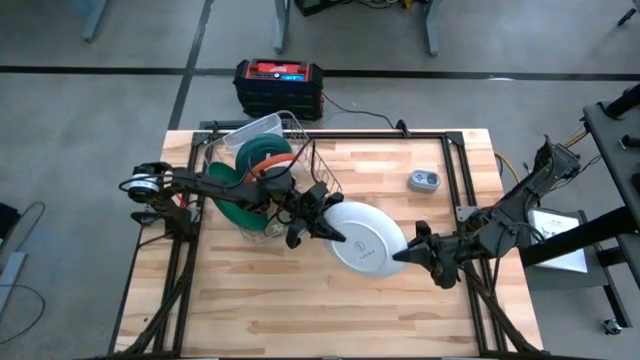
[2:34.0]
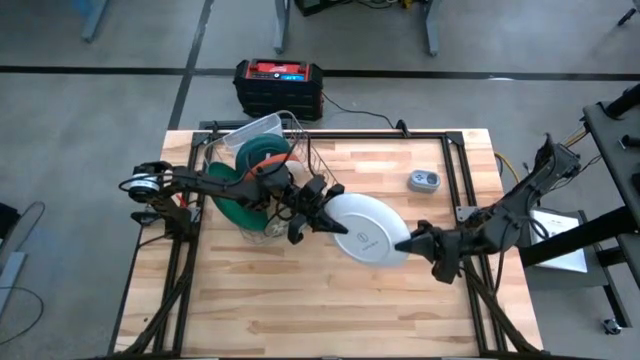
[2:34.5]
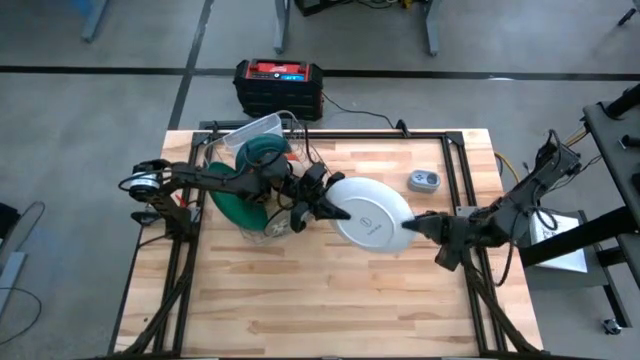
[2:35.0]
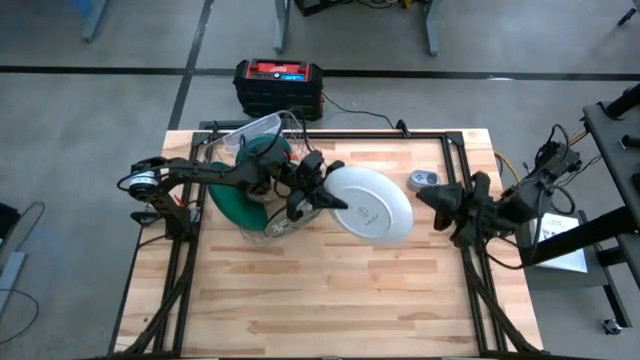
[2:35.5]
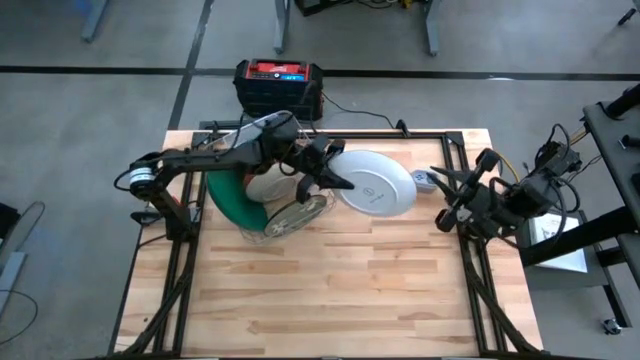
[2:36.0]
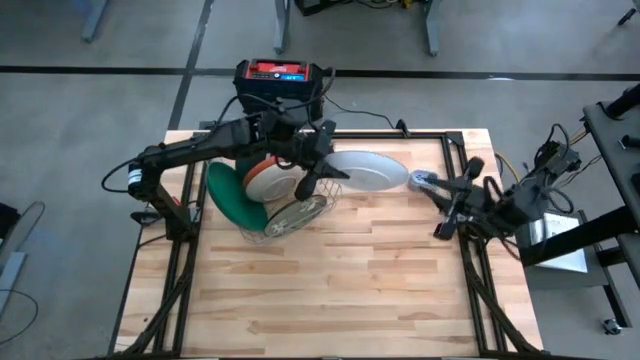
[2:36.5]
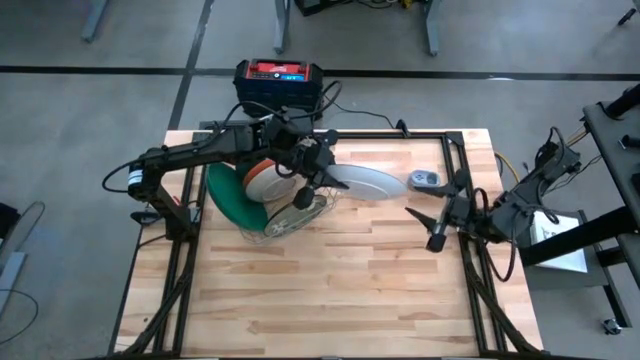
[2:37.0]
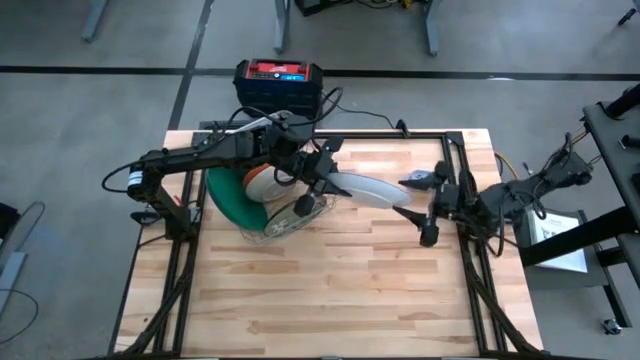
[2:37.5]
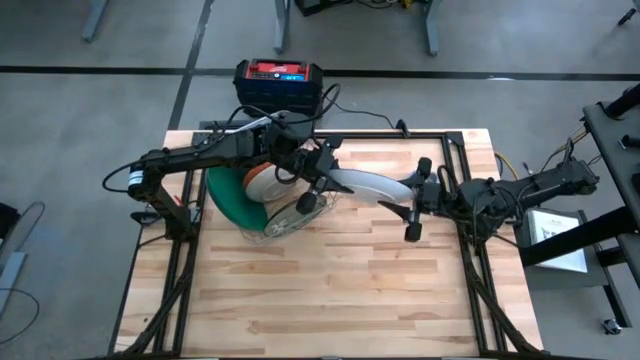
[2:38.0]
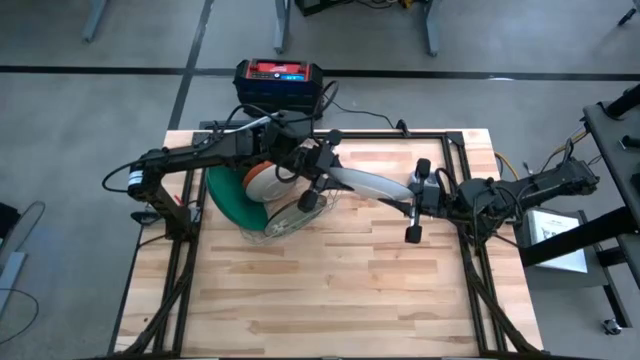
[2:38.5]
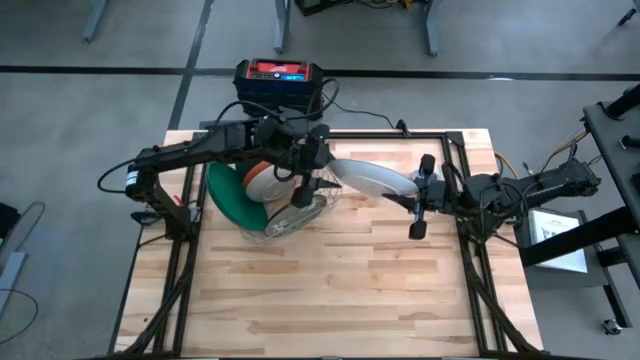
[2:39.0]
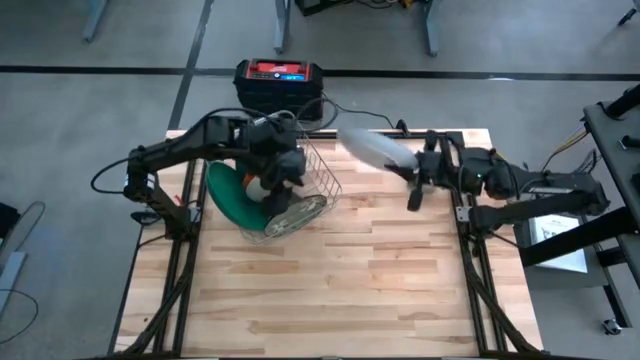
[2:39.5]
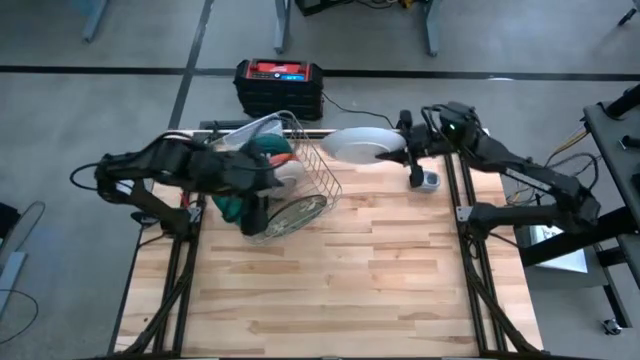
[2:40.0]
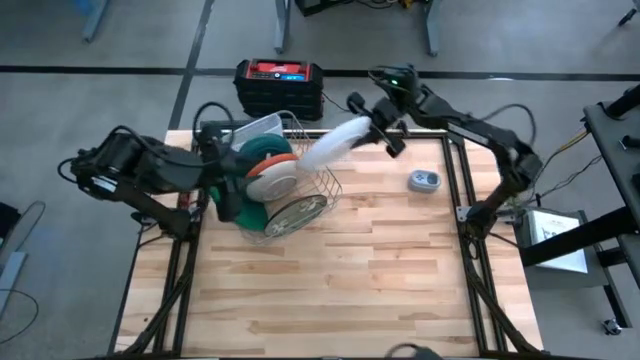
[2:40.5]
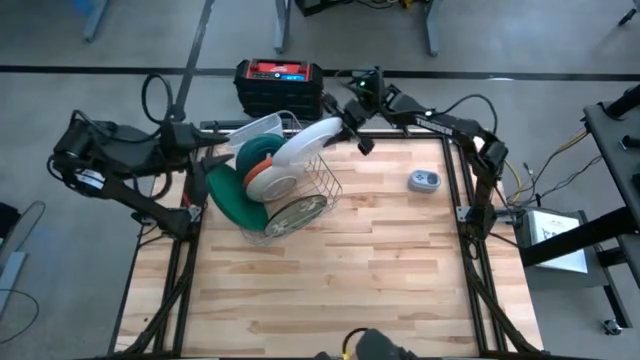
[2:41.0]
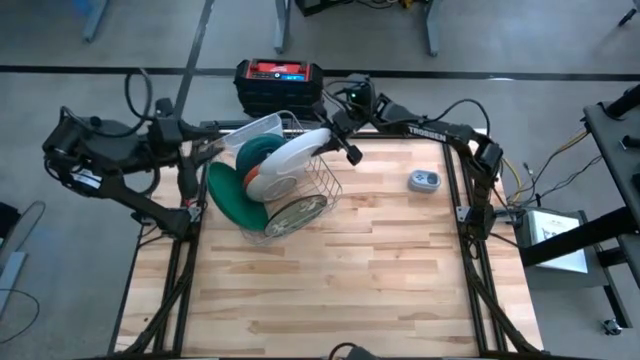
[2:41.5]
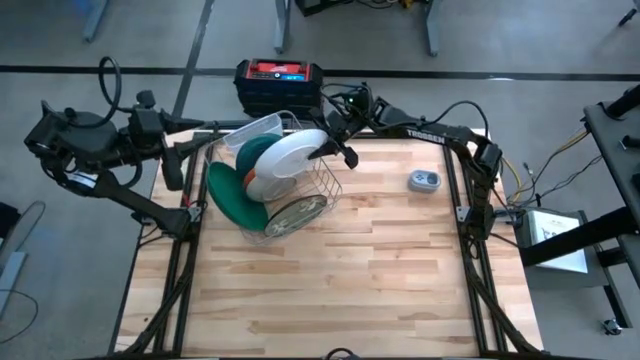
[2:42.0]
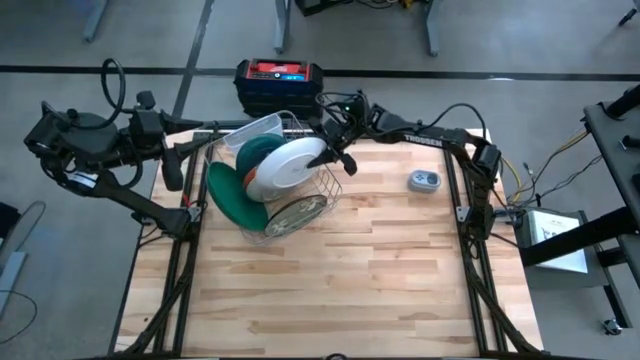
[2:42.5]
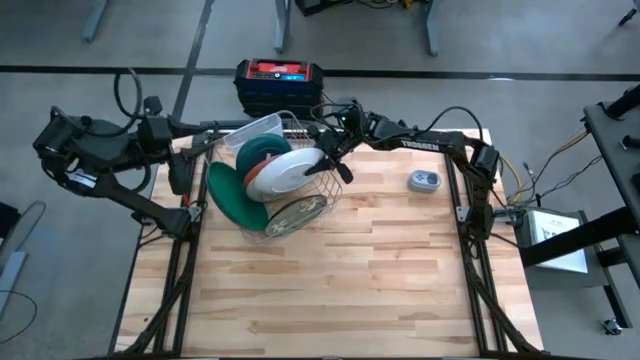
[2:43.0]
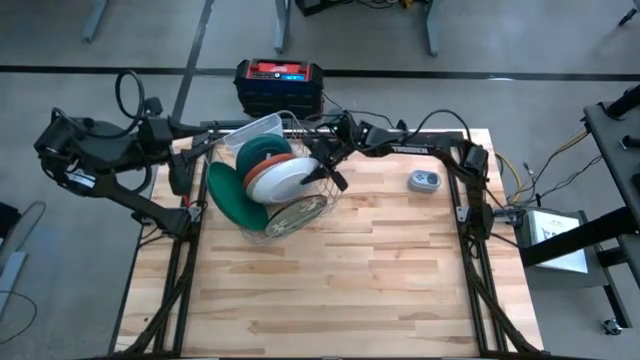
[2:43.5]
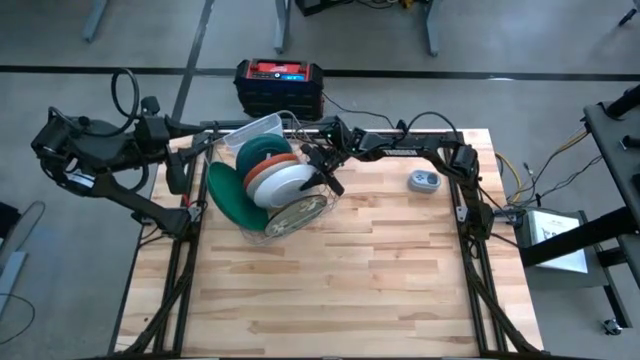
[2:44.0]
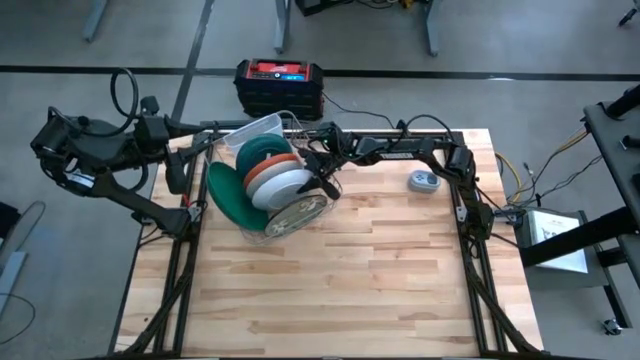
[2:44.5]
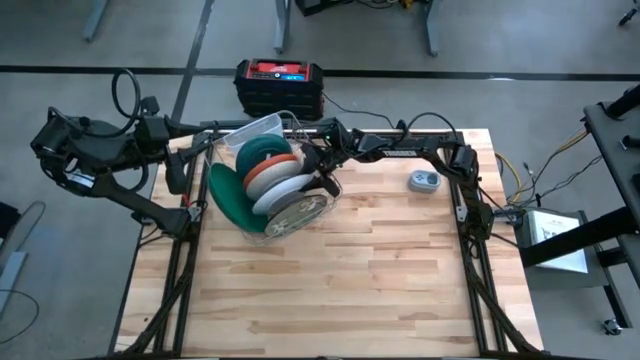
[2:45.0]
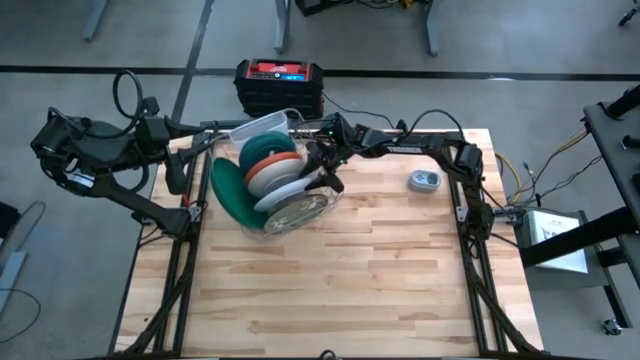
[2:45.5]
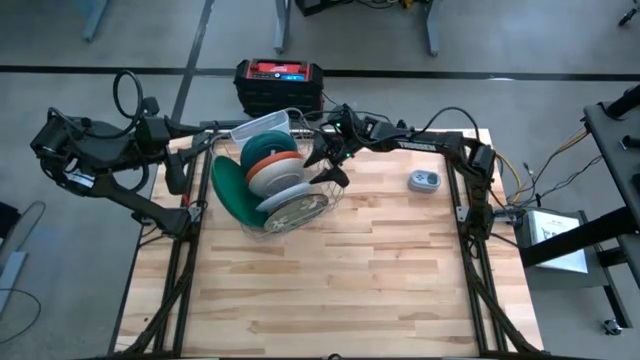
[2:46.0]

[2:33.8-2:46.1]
Task: Sort dishes
Adjust the blue ceramic plate into the dish rack

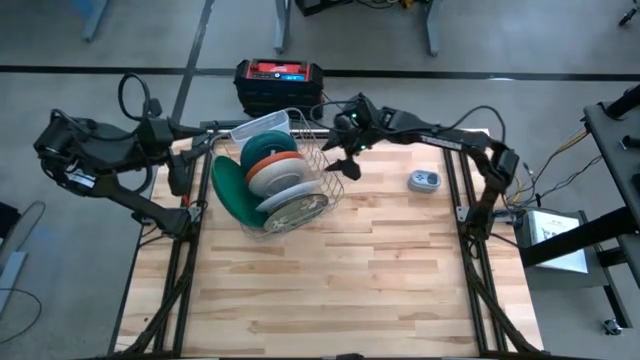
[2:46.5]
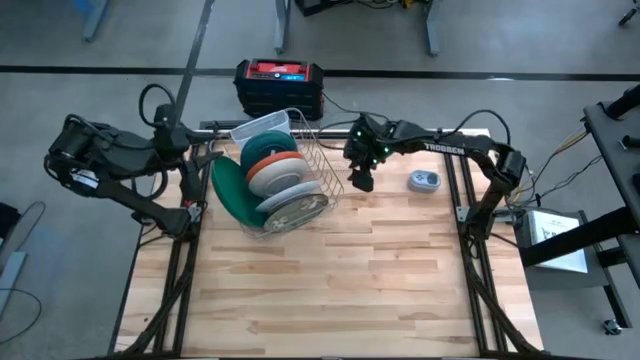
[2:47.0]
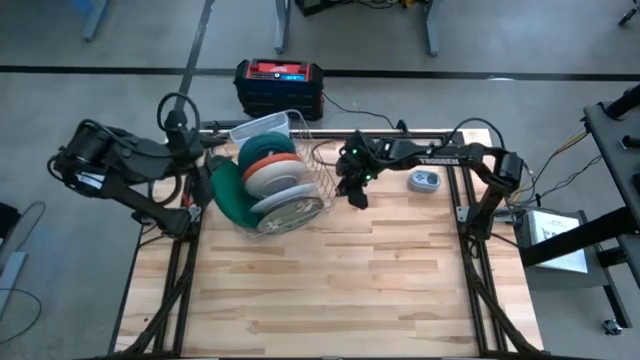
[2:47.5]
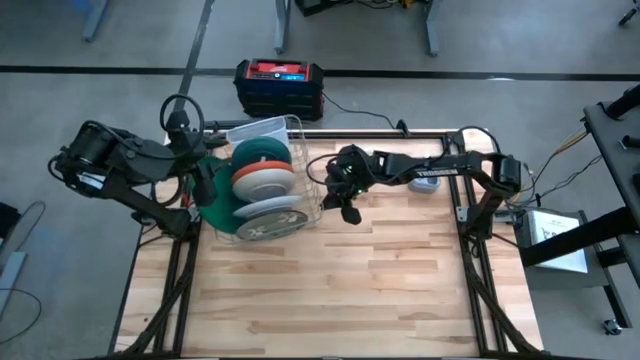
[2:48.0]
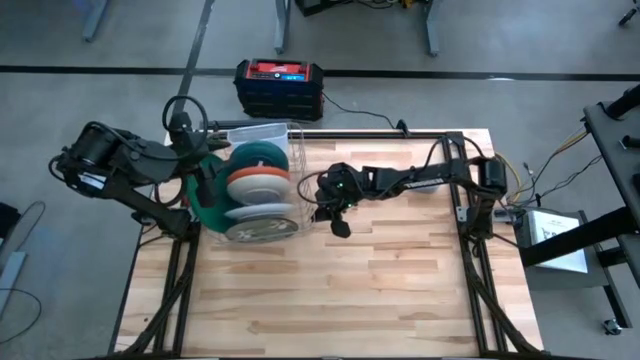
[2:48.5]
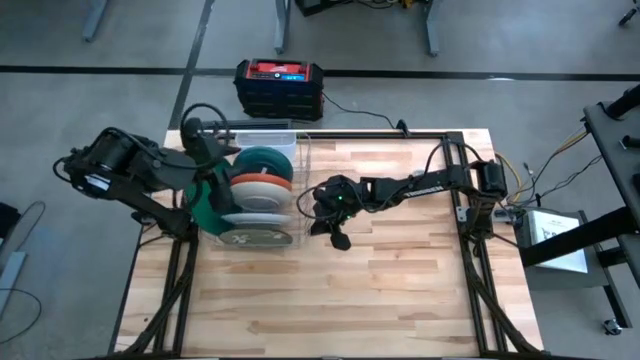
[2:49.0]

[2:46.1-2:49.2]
Adjust the dish rack

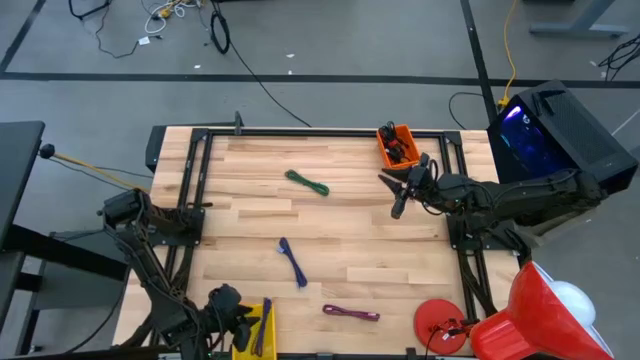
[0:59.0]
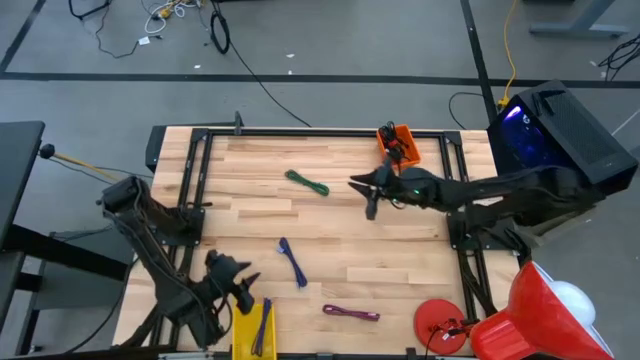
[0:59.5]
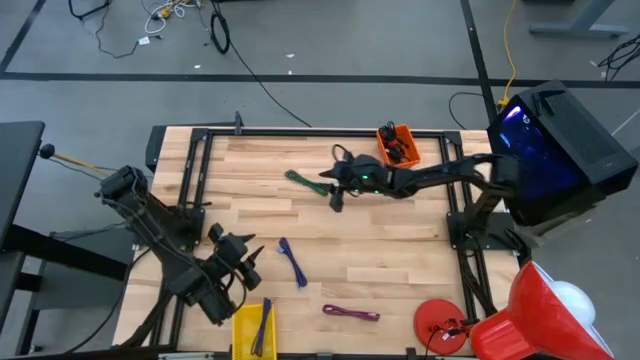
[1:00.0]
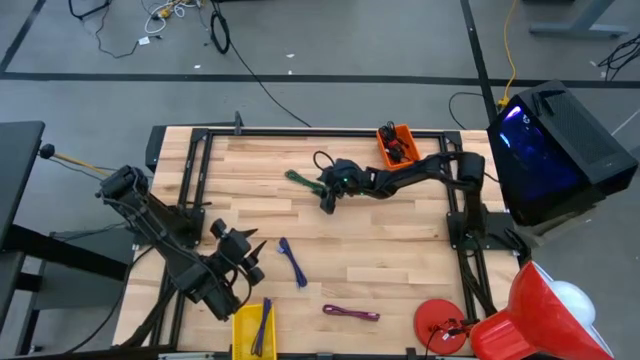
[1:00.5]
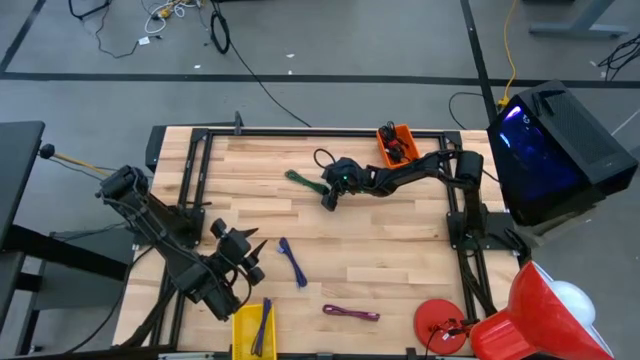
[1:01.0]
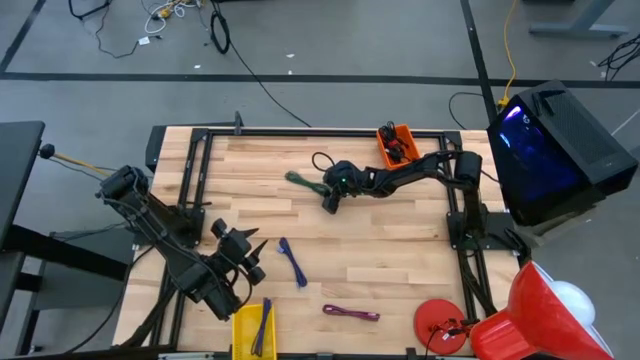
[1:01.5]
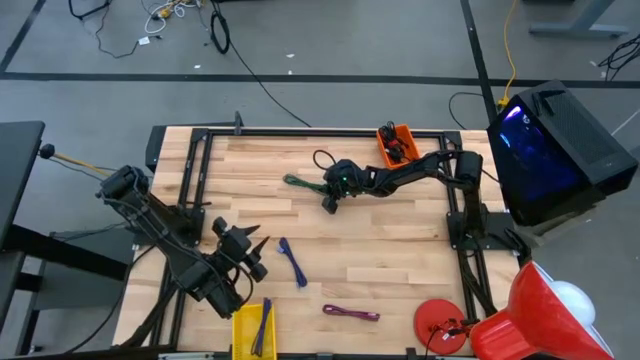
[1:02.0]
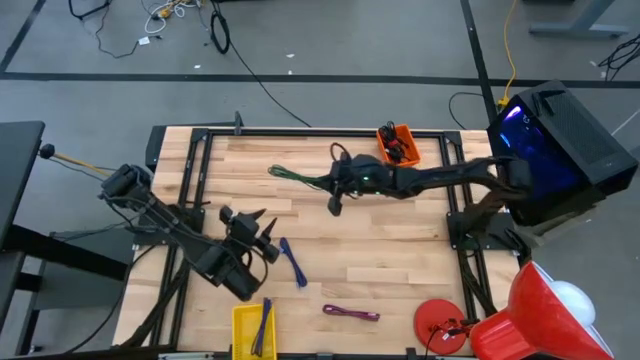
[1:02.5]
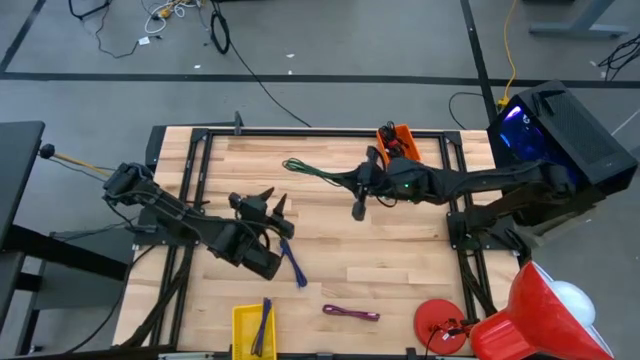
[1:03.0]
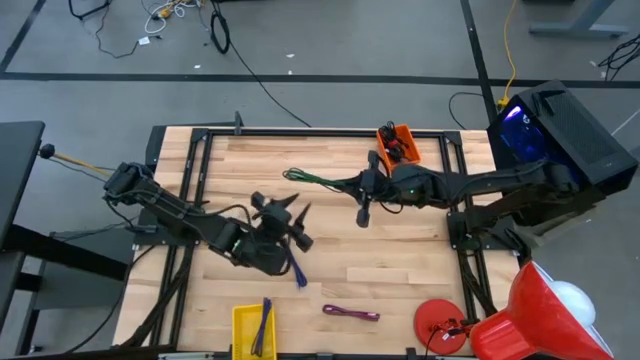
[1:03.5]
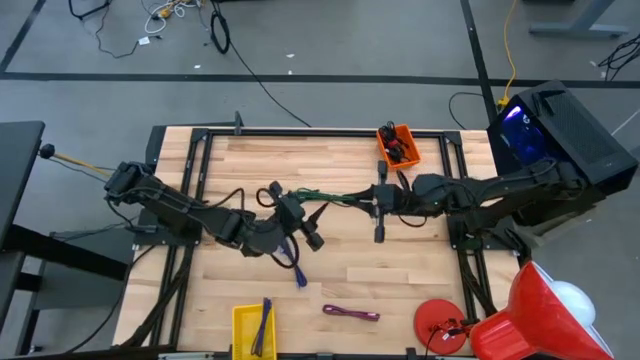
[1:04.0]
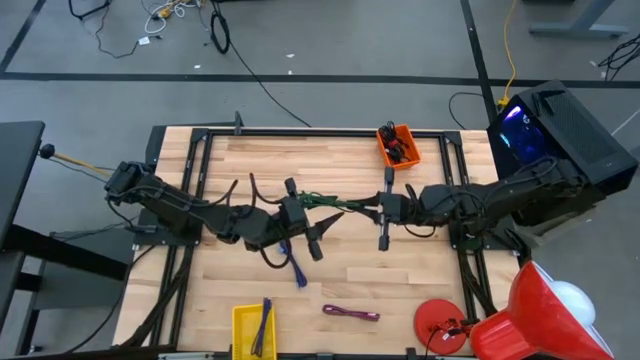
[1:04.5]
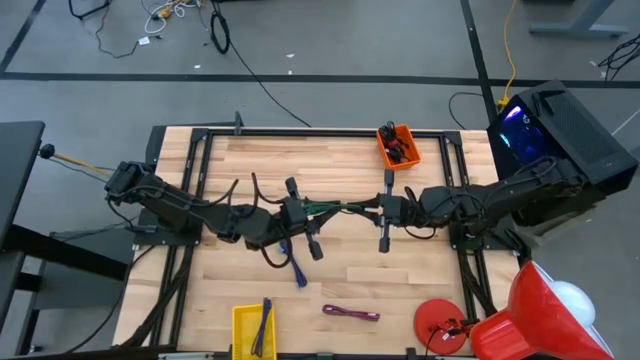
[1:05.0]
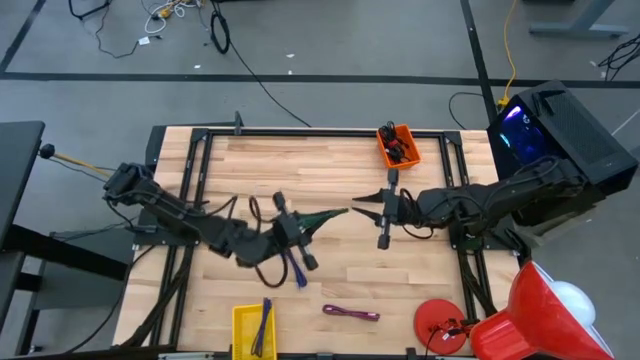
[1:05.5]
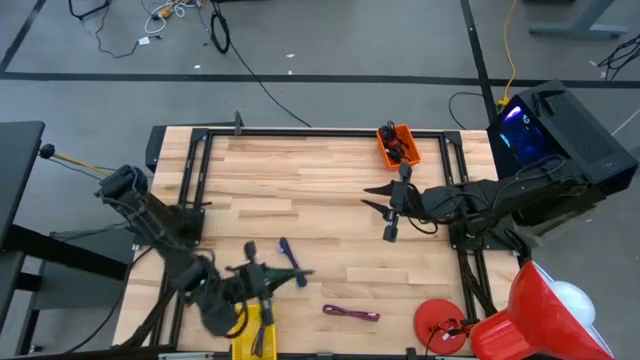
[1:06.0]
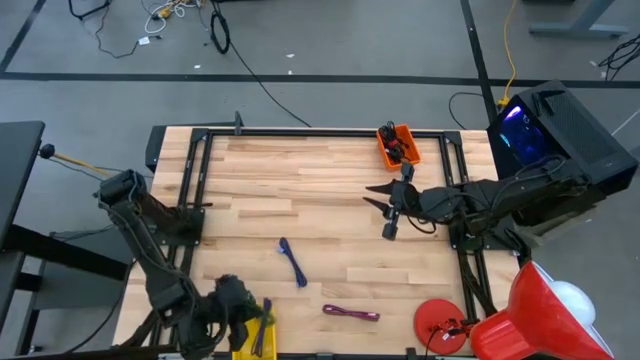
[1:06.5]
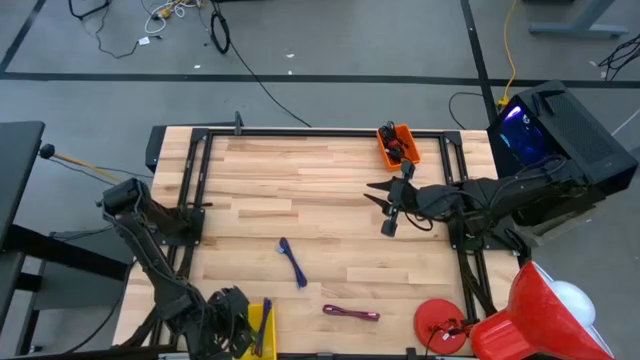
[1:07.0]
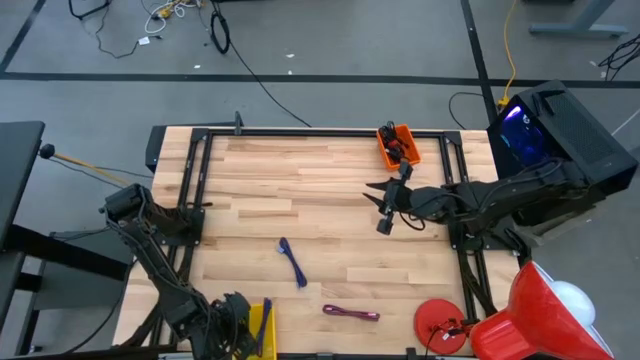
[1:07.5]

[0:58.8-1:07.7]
Task: Pick & Place USB Port
Put the green and black charger cable into the yellow bin
